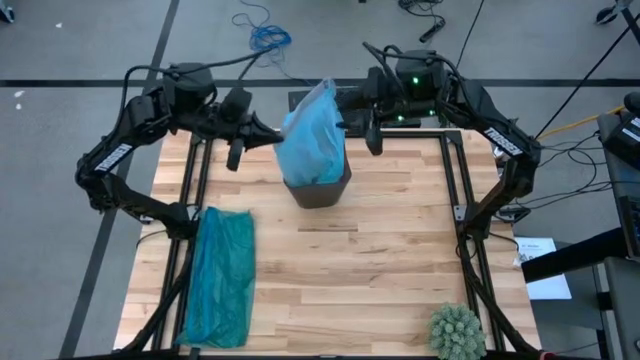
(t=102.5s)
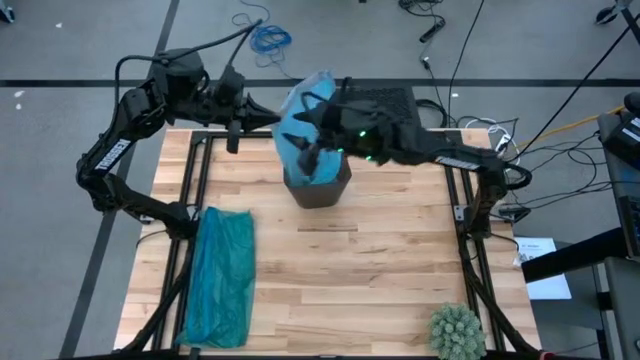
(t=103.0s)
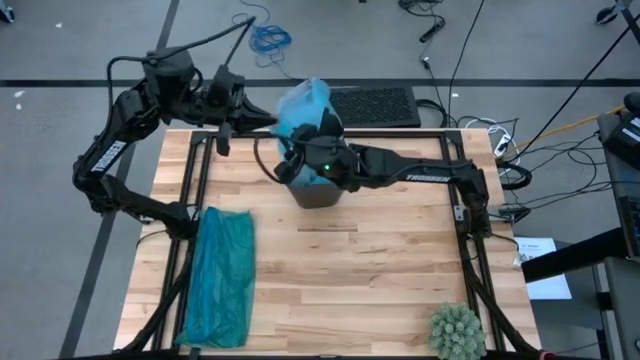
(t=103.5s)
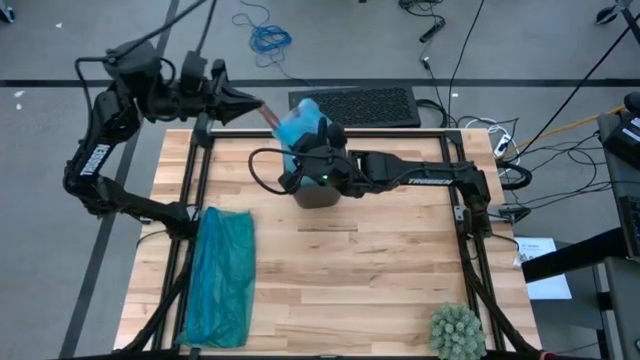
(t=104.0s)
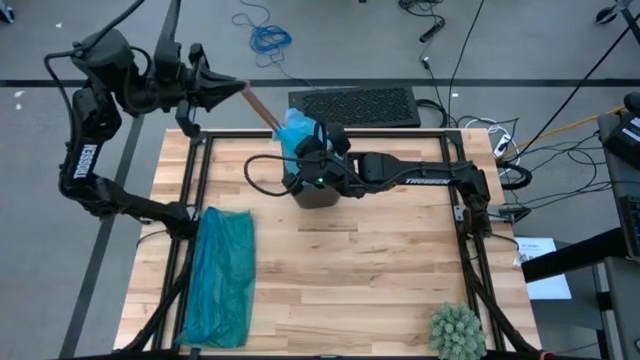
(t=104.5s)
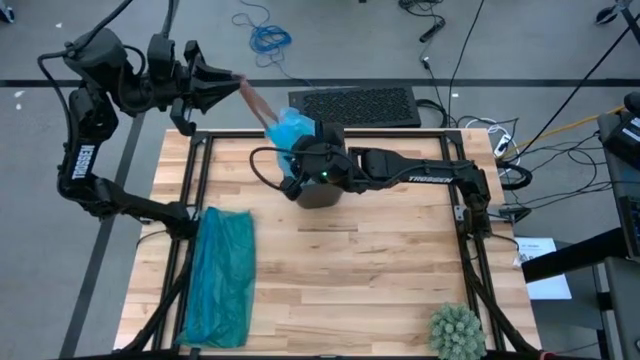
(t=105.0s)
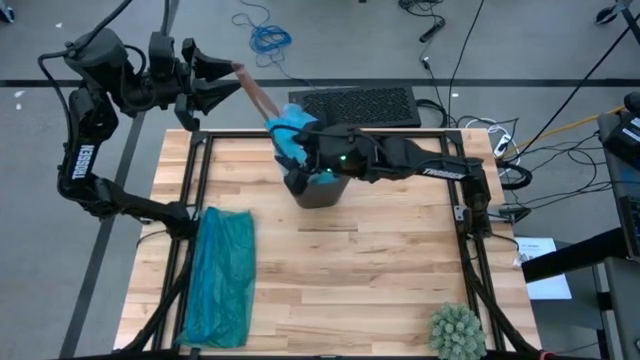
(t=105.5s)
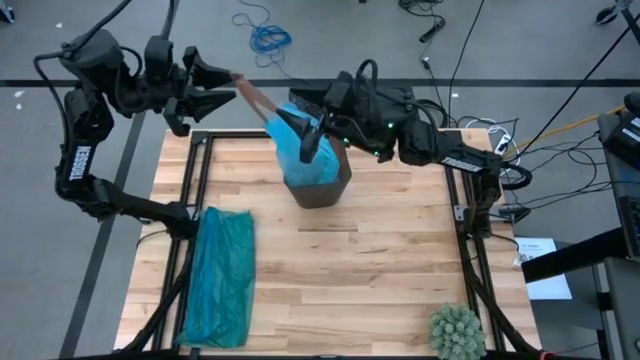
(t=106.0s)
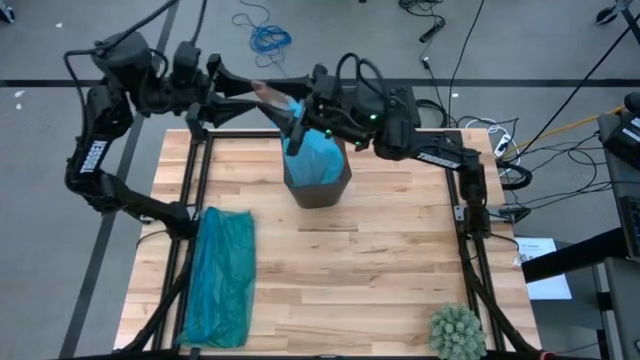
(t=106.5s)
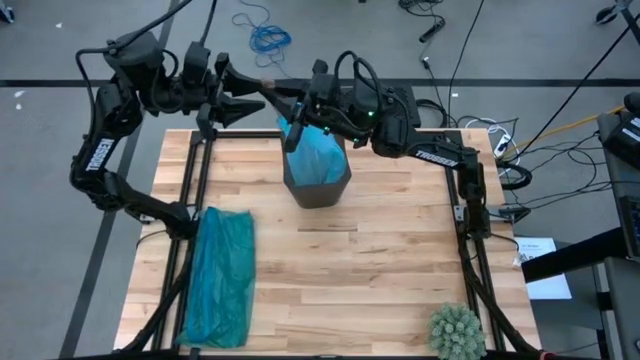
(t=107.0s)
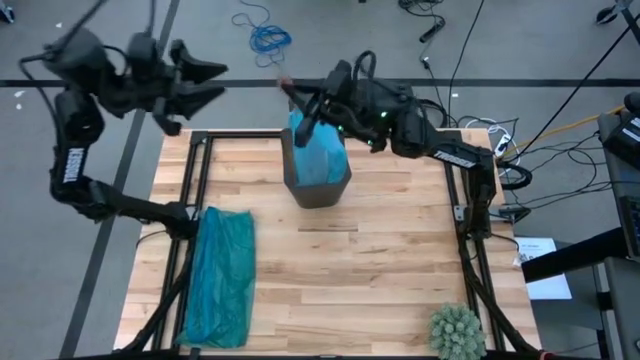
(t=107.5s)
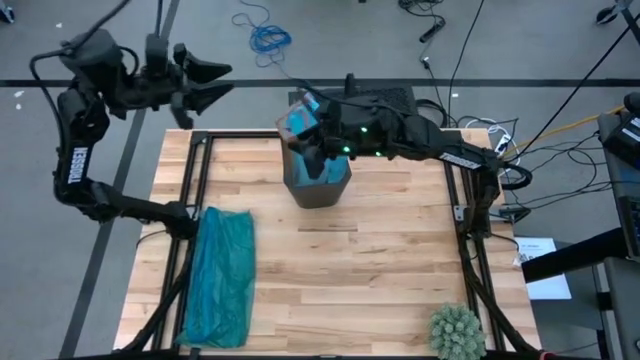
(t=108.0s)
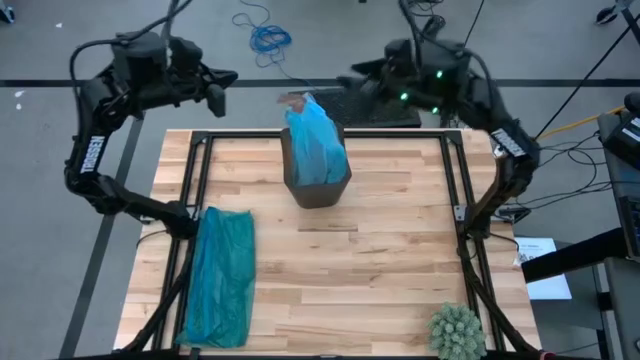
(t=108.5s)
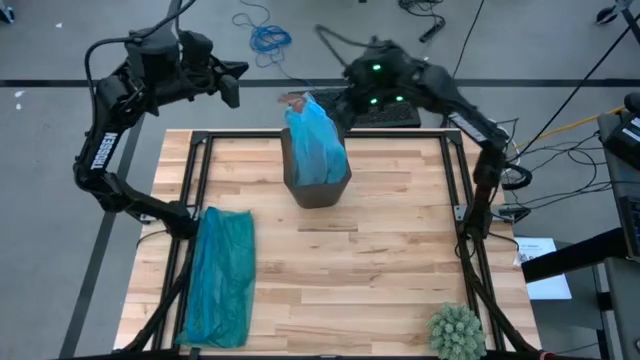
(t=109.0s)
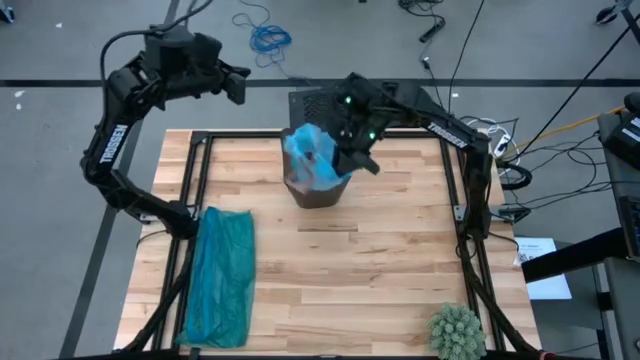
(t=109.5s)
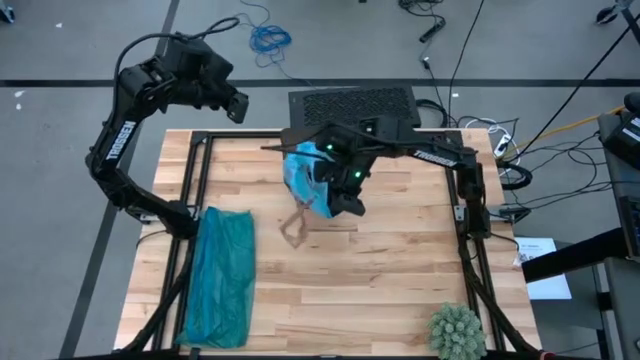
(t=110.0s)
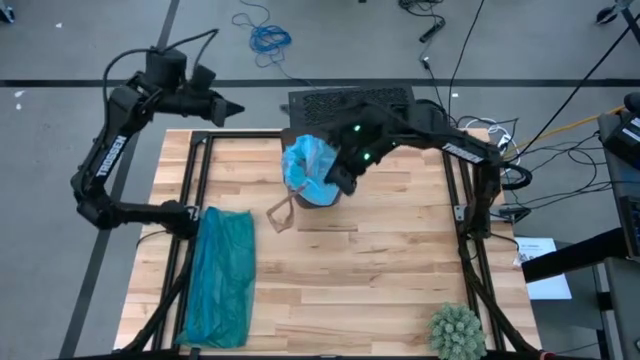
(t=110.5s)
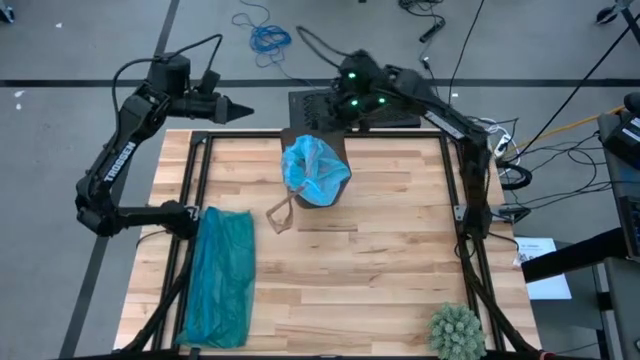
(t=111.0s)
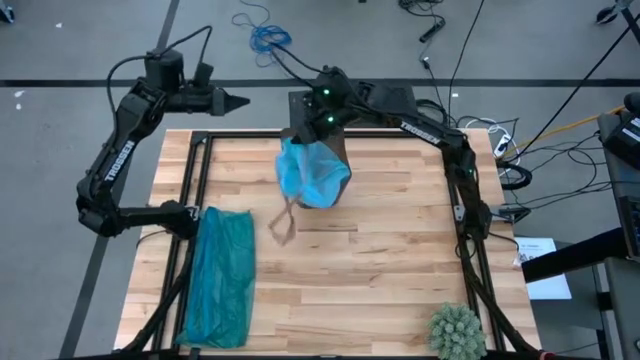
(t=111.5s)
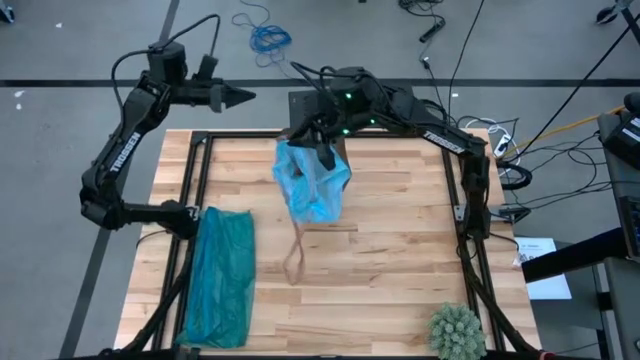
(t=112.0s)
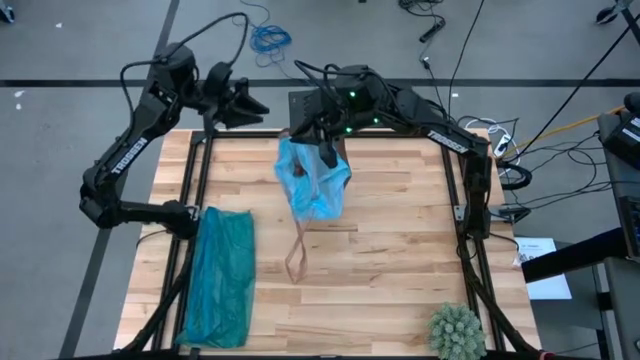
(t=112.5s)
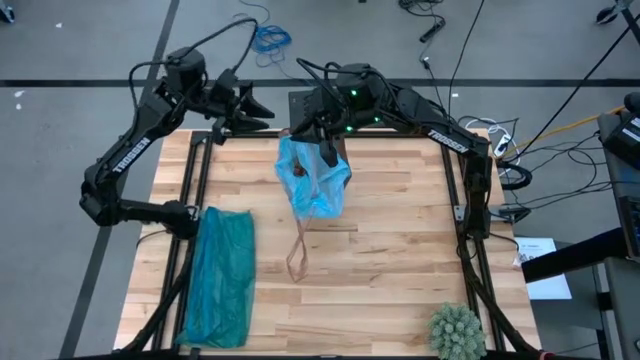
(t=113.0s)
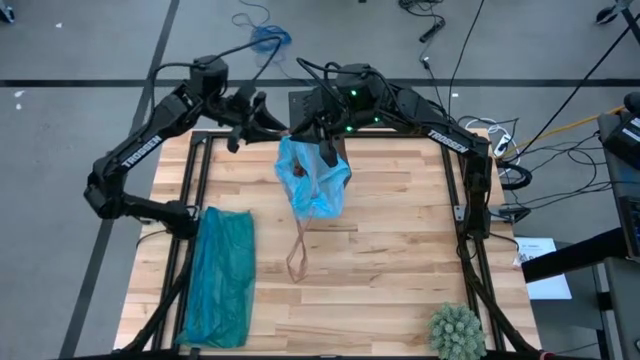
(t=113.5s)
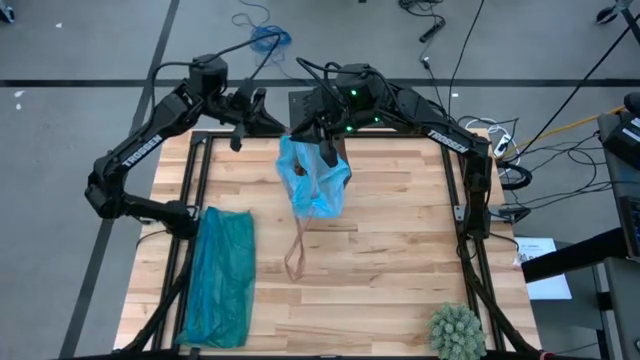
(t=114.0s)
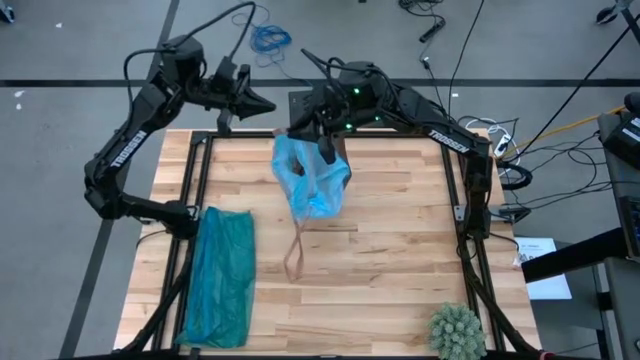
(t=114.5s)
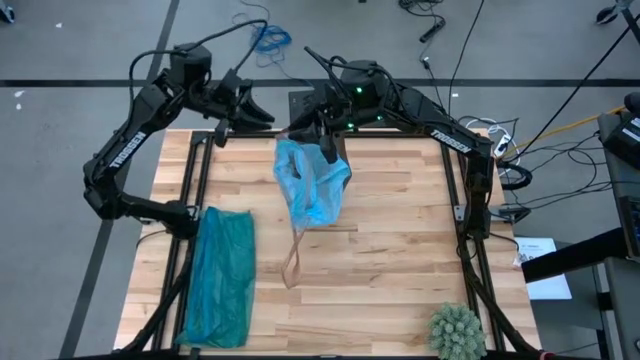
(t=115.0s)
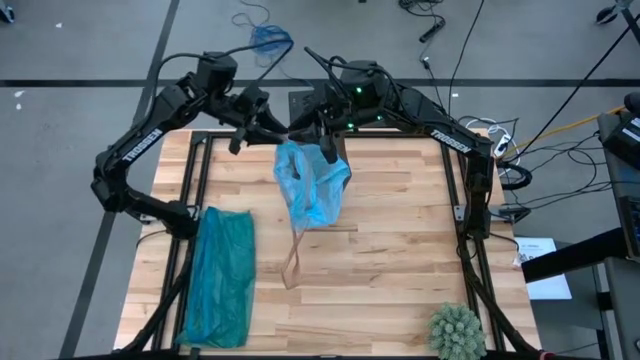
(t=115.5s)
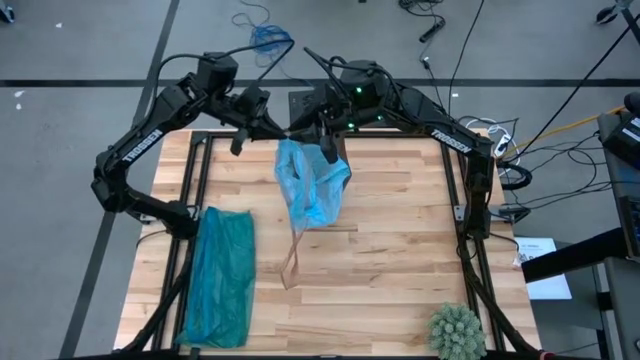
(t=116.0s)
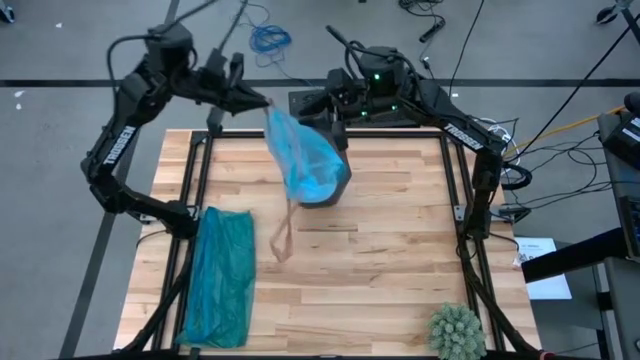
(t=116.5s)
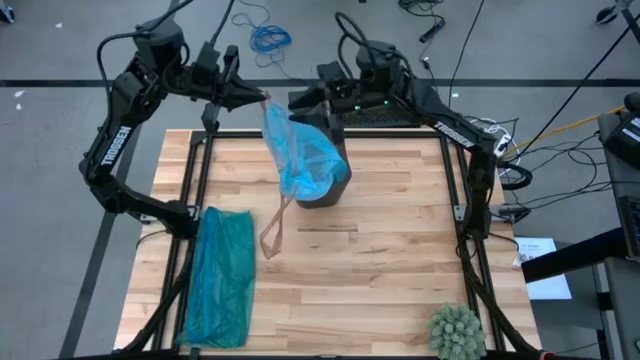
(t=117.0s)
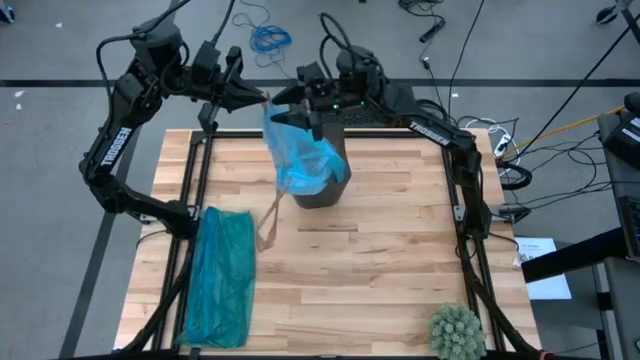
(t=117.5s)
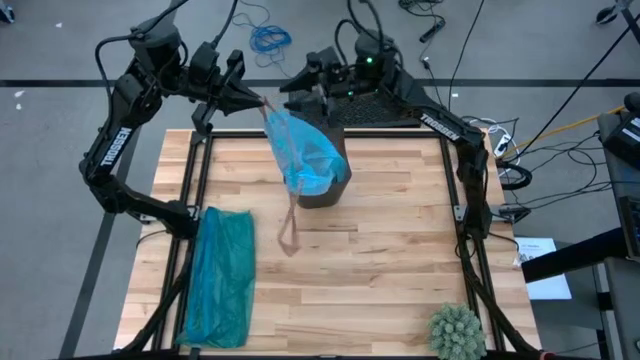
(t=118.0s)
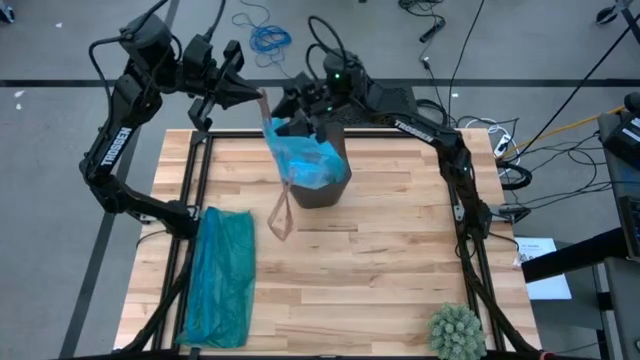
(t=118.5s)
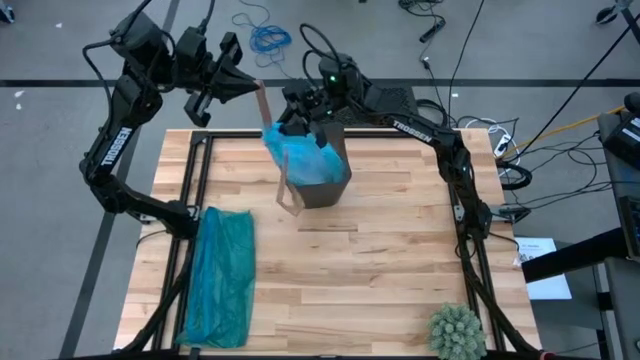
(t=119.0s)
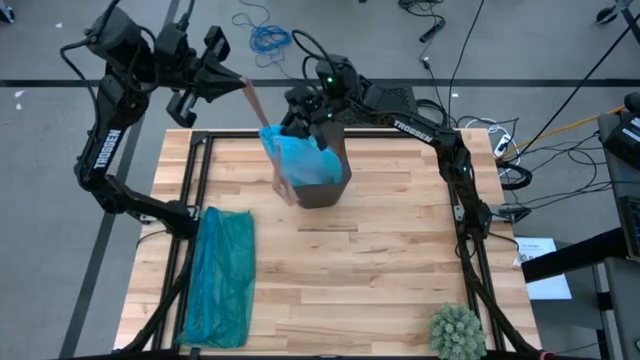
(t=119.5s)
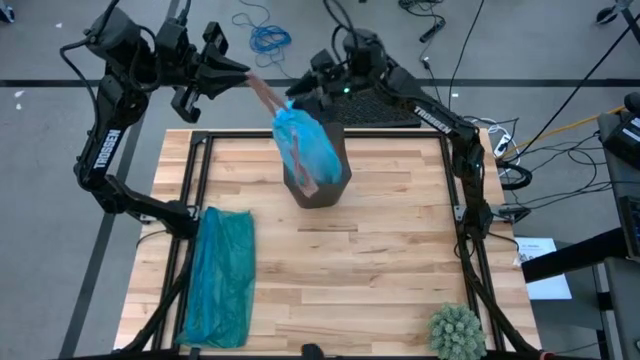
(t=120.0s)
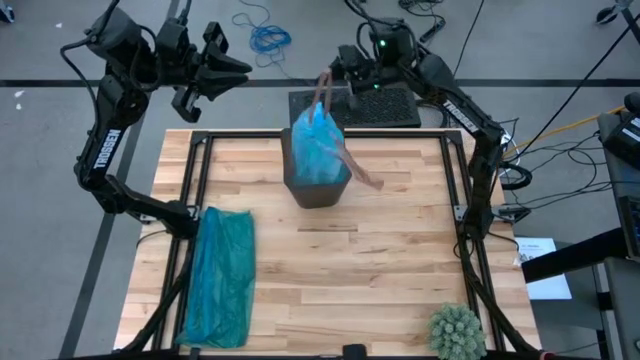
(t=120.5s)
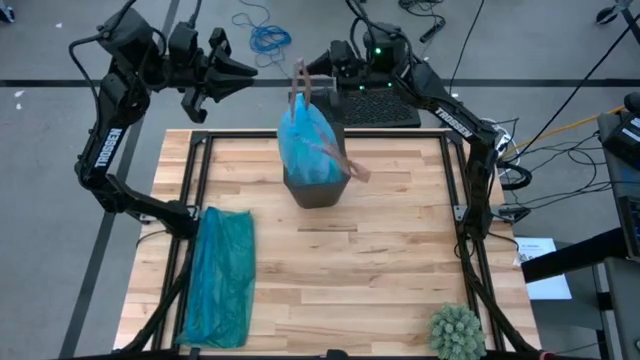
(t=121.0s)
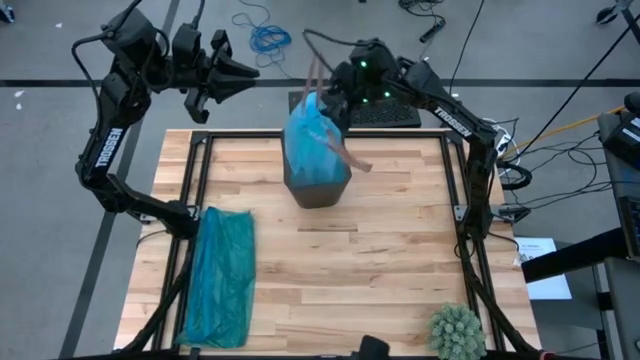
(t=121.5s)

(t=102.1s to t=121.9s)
Task: place trash/remove bag and relplace
Close the blue trash bag in the trash bin

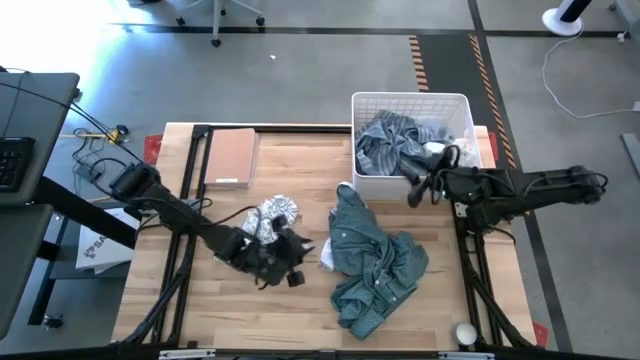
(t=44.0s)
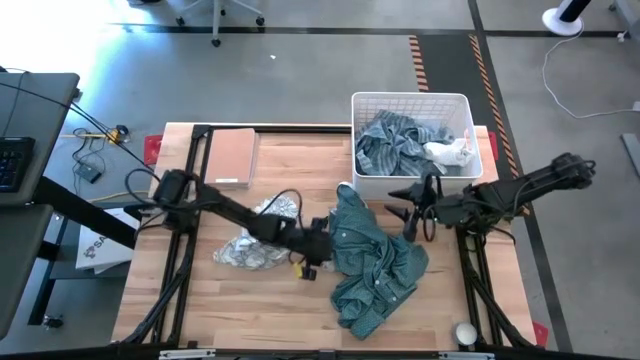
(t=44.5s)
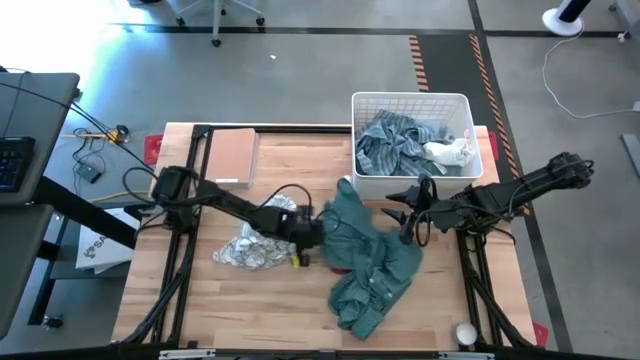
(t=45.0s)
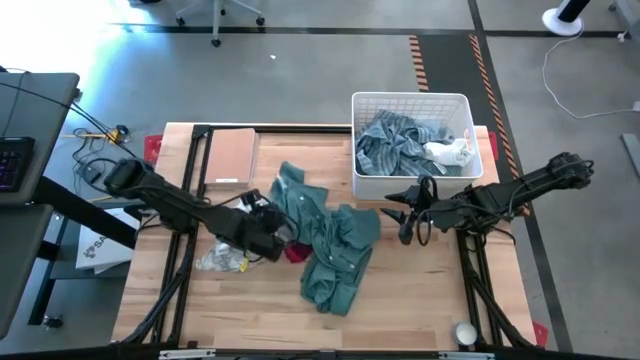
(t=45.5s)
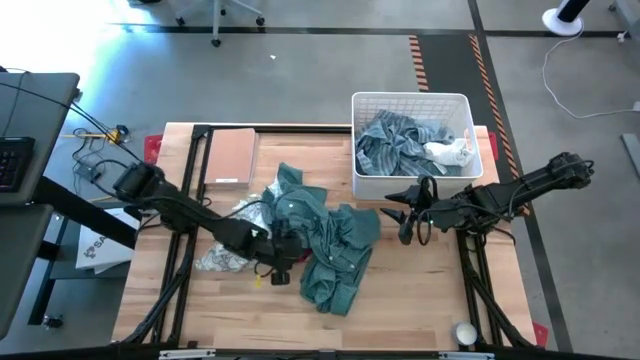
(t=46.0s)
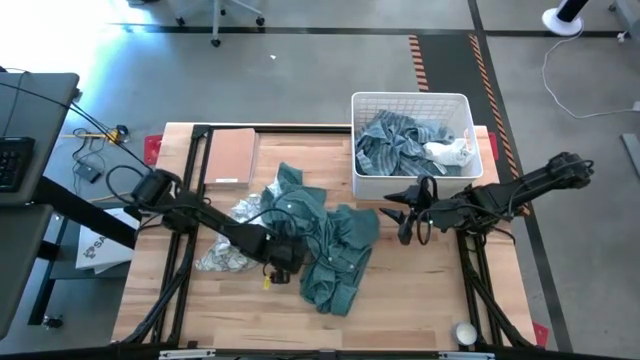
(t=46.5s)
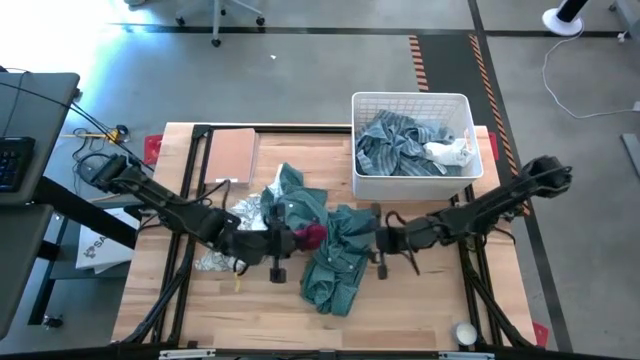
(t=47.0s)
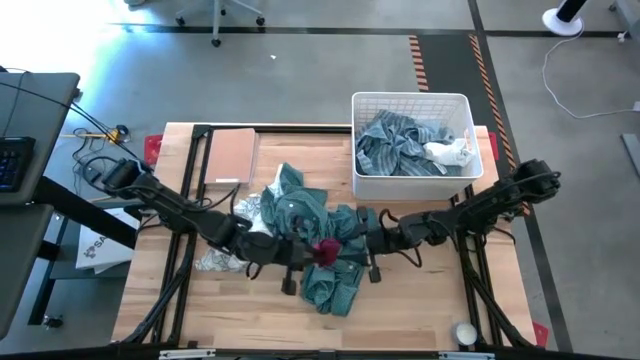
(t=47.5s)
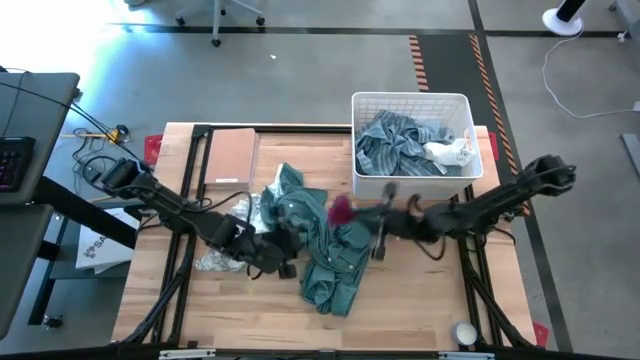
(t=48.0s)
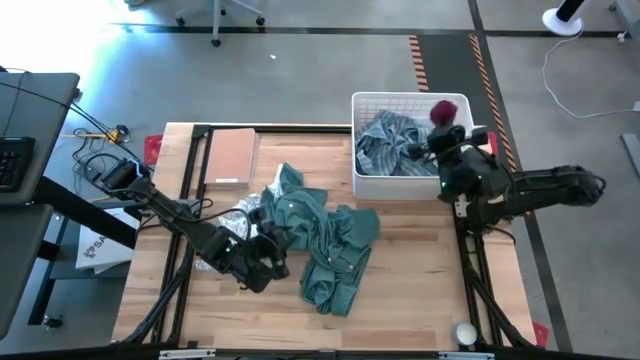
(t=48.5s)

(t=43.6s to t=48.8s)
Task: Sort clothes
Put the red socks into the white laundry bin
